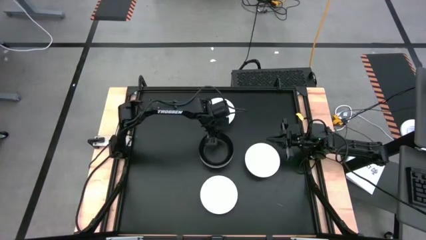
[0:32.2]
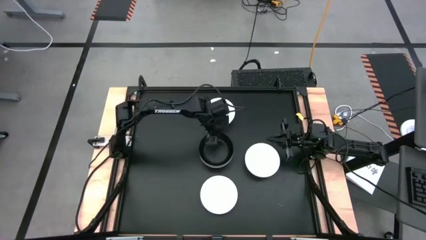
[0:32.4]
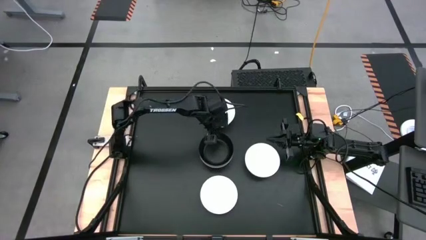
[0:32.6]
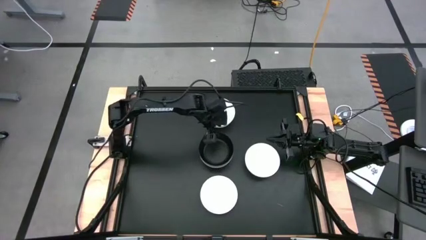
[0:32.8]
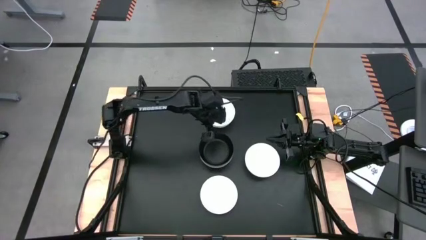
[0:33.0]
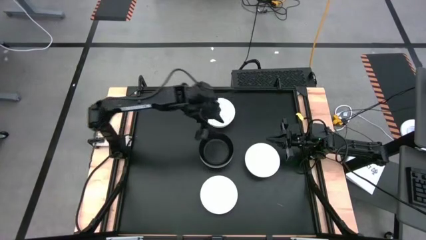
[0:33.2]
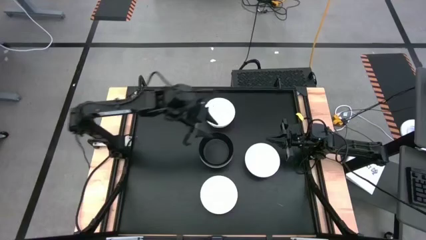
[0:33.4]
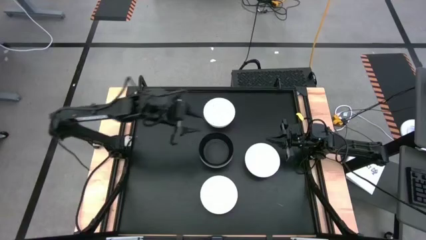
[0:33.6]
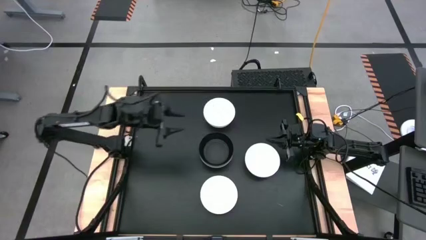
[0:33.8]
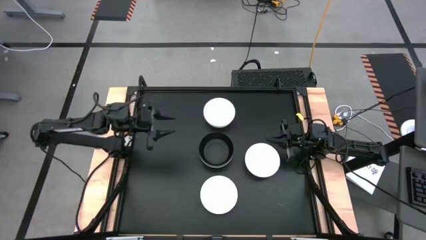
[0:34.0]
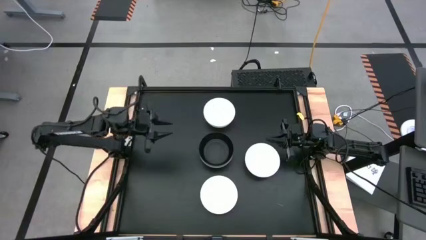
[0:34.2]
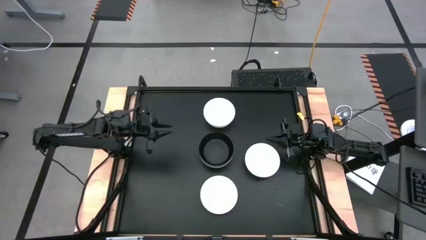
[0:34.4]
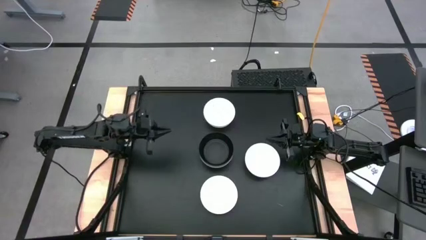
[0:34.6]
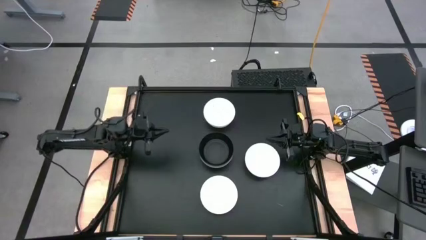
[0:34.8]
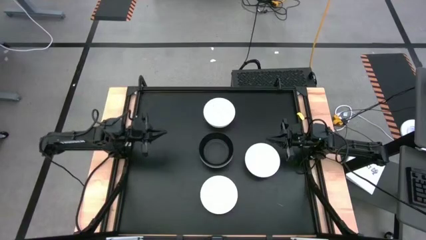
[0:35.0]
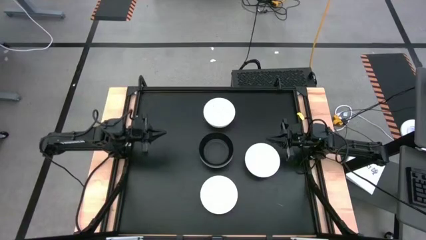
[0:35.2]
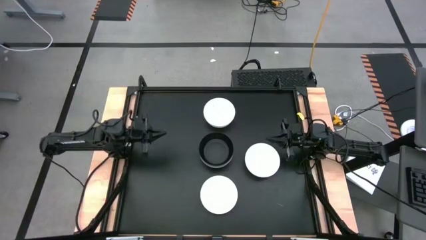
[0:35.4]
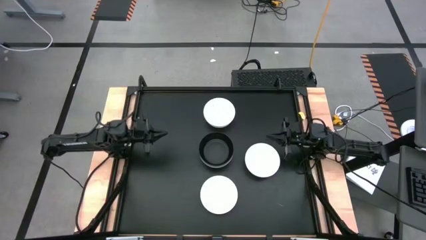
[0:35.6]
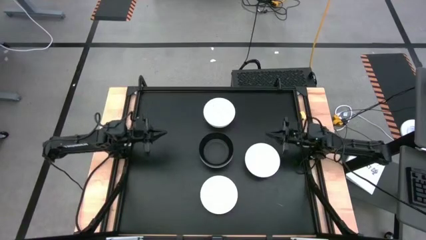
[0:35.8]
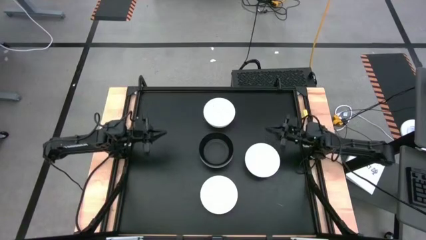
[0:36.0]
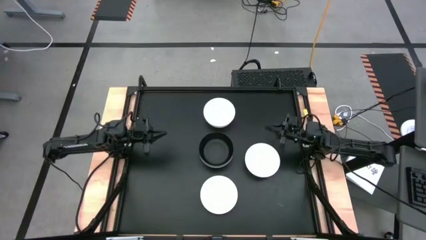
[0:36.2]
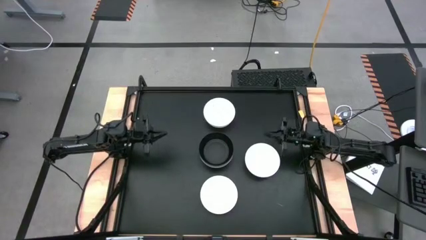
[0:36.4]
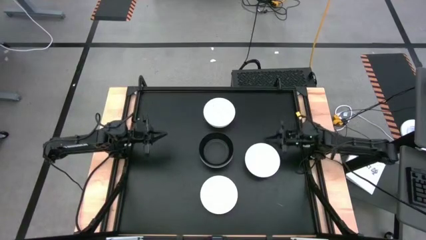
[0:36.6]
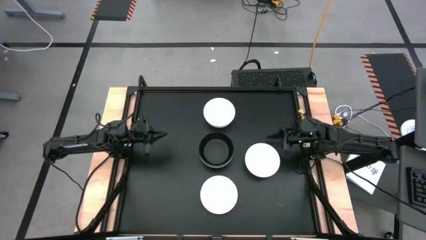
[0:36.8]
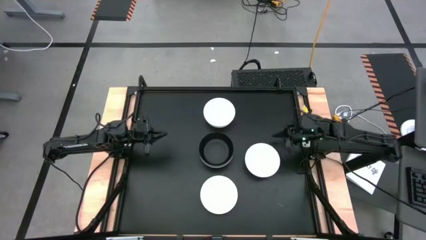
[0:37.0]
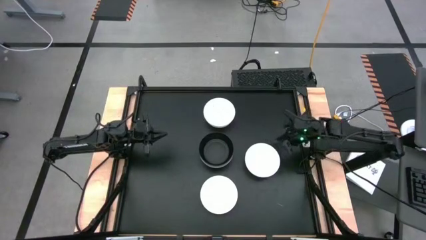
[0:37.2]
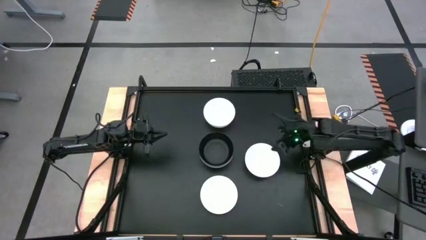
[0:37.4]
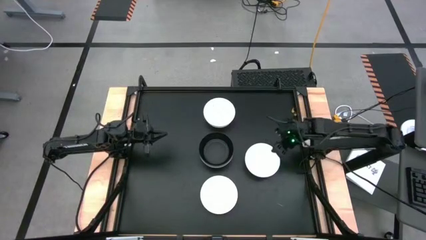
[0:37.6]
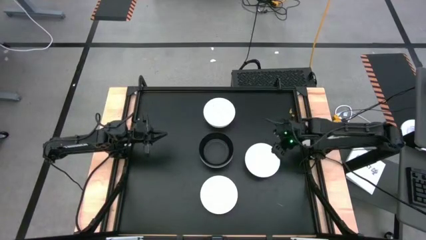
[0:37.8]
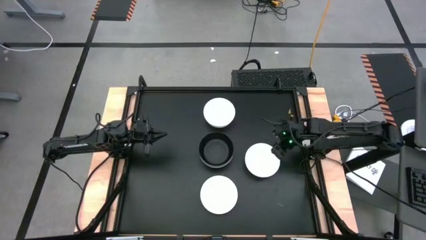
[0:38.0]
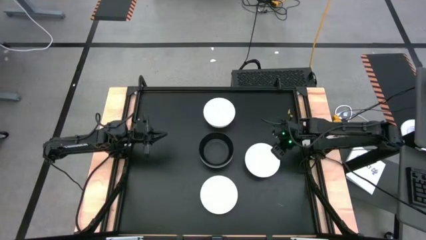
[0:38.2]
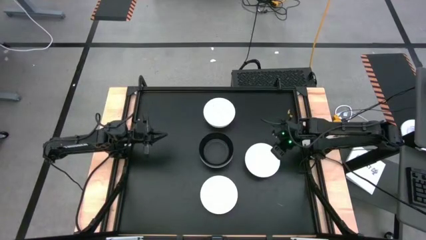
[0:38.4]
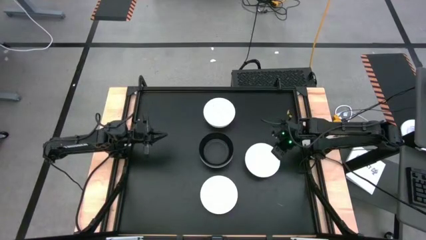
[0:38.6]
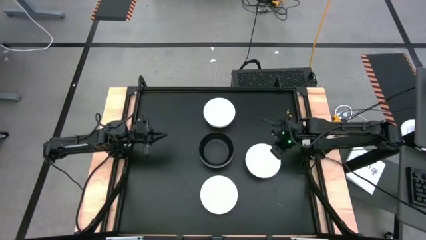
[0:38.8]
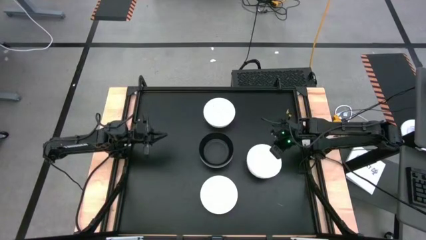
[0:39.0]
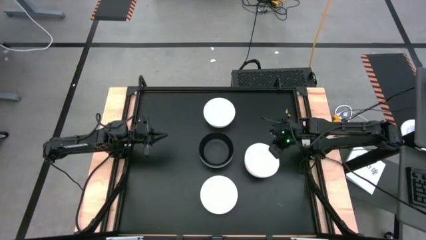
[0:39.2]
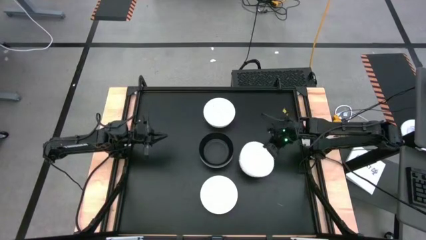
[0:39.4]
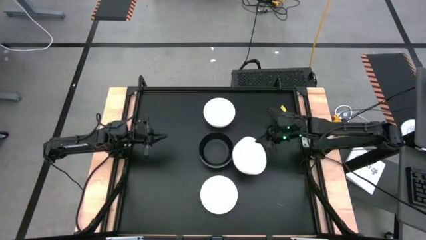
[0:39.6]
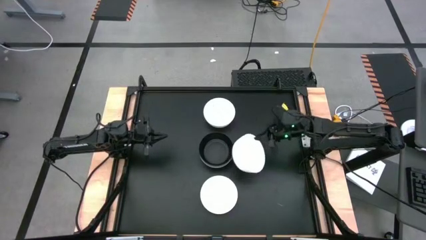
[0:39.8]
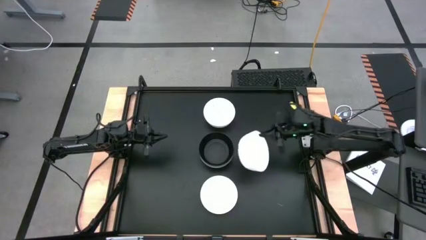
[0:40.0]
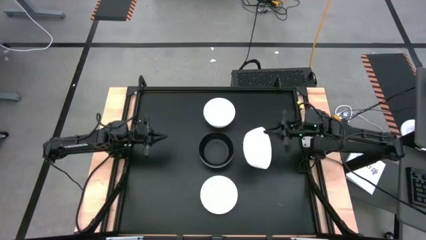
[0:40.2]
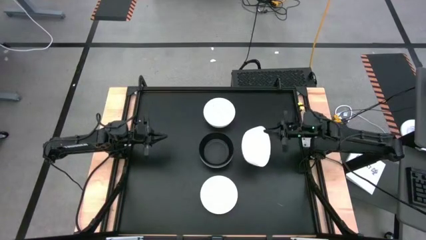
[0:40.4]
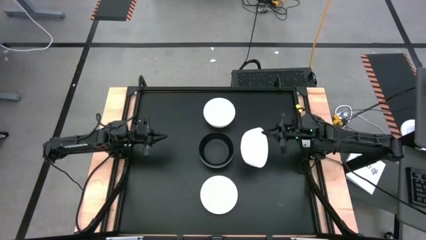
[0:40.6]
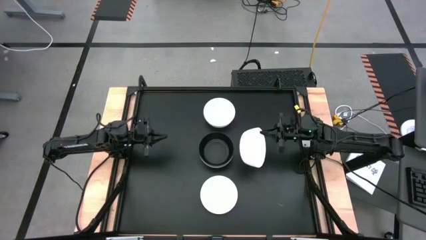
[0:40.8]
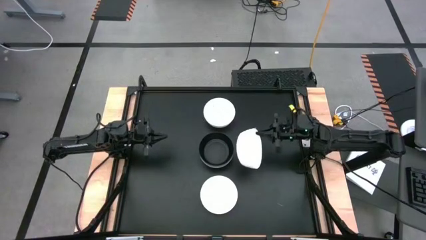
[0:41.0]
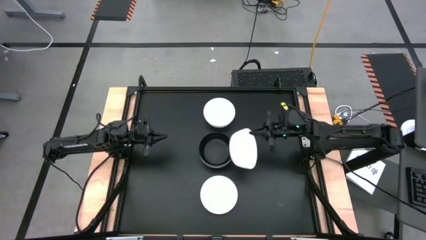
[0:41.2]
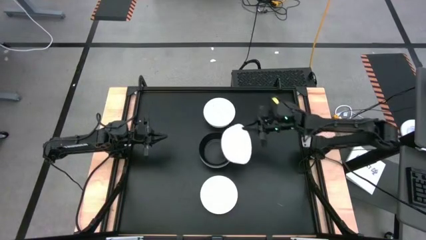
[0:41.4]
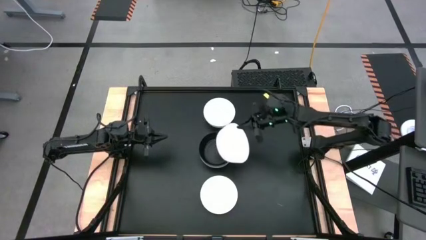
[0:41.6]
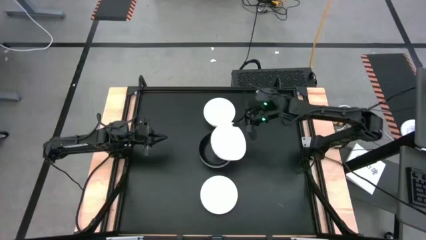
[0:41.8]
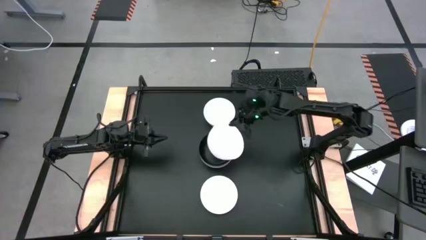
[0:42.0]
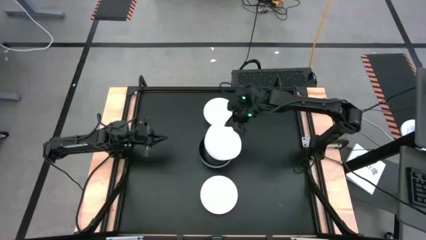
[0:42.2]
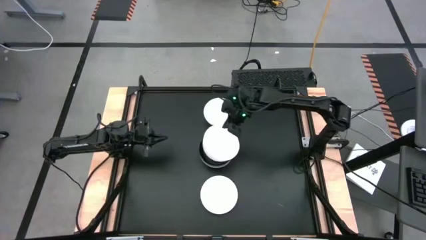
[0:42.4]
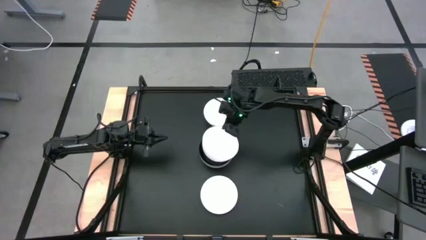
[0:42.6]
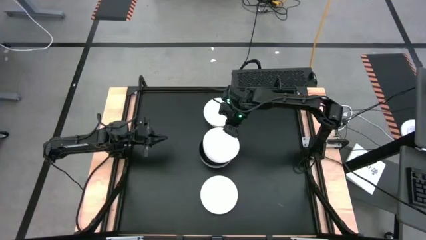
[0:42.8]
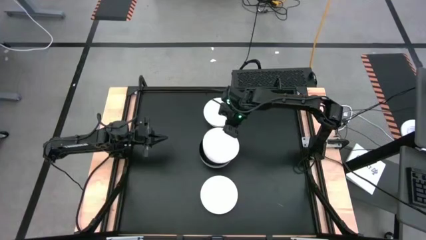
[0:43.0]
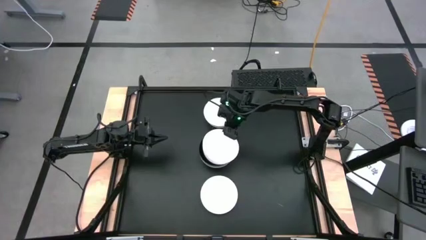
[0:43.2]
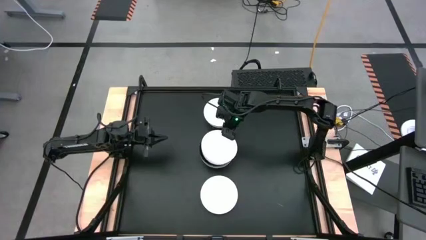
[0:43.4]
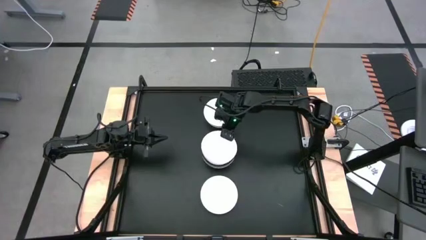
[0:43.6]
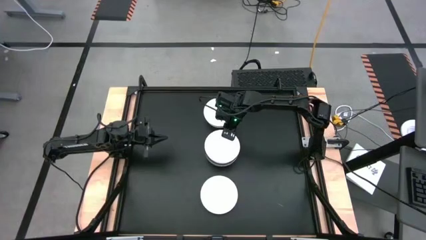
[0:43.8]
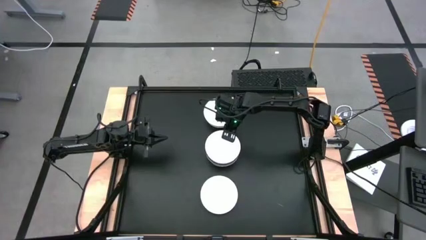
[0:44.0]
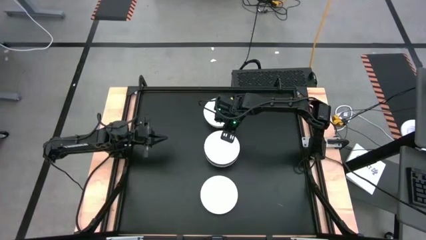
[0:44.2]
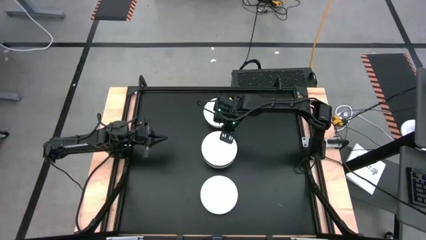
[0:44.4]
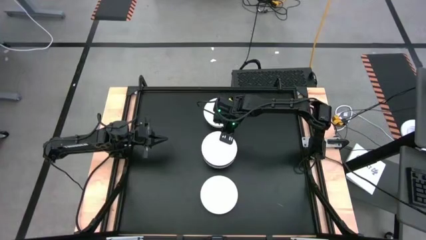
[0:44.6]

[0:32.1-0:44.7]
Task: Nest bowls inside each other
Stack the middle white bowl on top of the black bowl

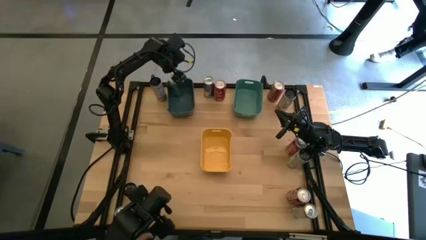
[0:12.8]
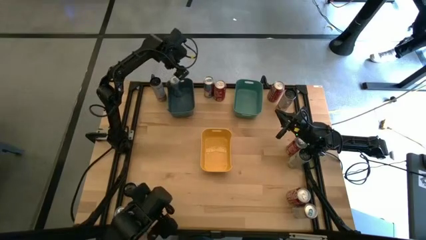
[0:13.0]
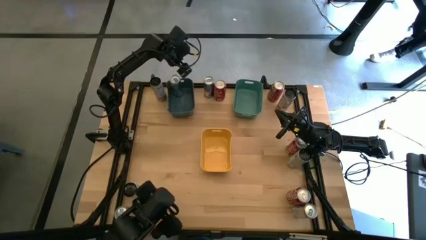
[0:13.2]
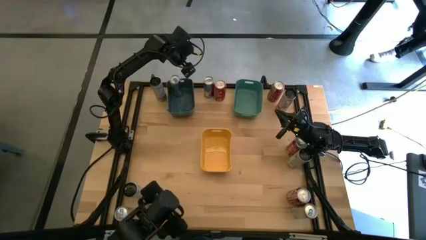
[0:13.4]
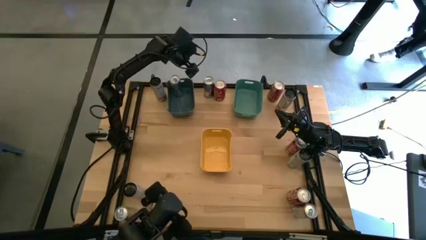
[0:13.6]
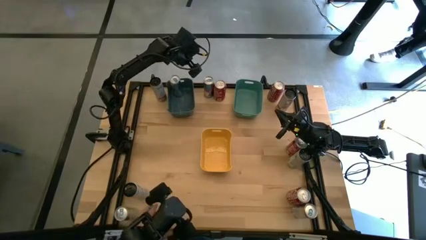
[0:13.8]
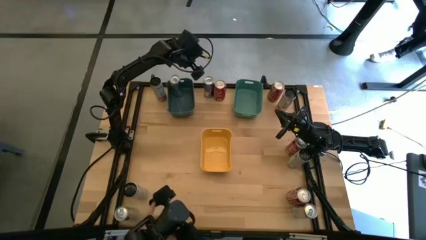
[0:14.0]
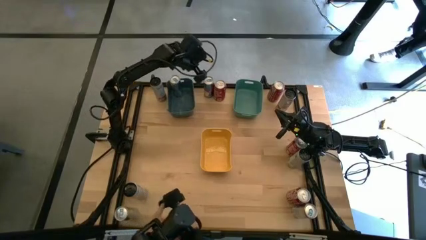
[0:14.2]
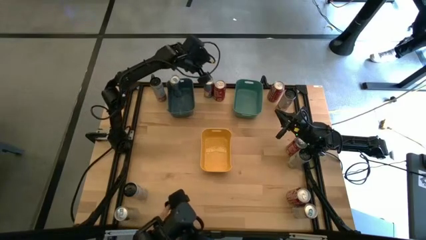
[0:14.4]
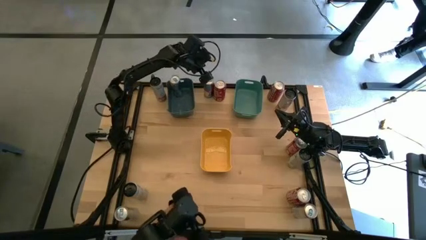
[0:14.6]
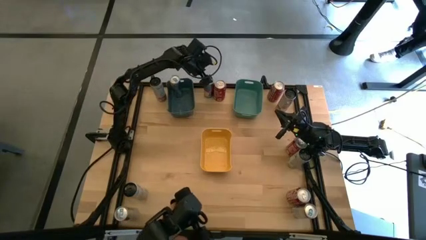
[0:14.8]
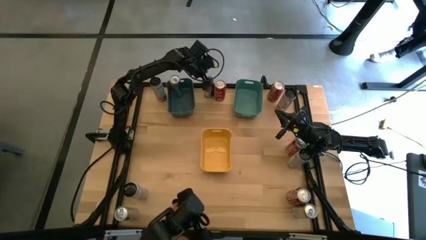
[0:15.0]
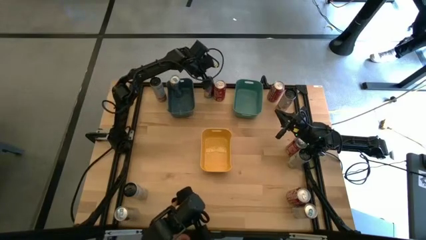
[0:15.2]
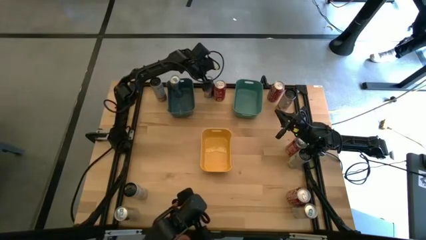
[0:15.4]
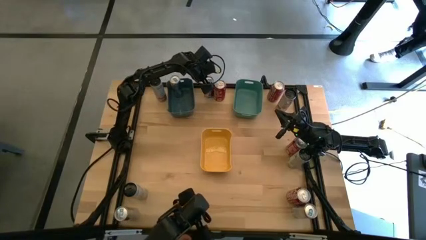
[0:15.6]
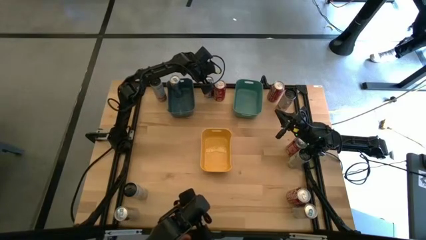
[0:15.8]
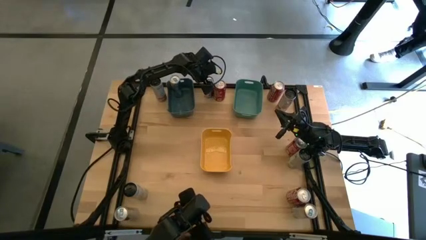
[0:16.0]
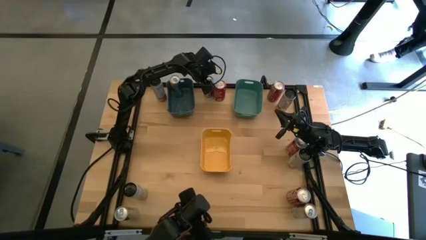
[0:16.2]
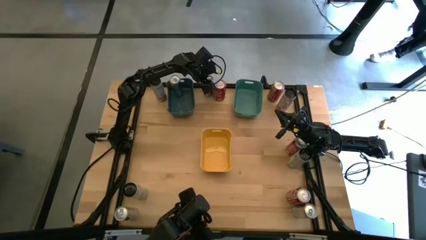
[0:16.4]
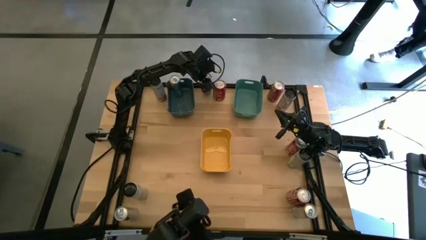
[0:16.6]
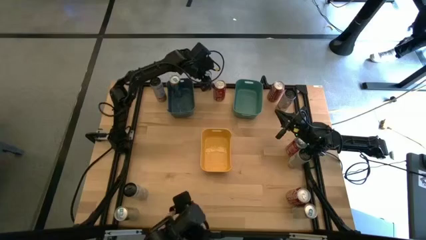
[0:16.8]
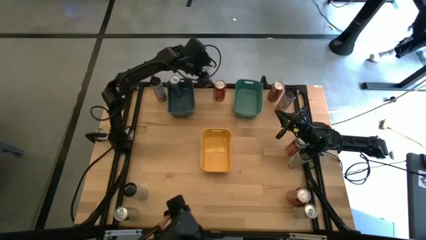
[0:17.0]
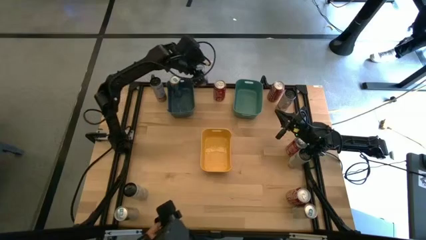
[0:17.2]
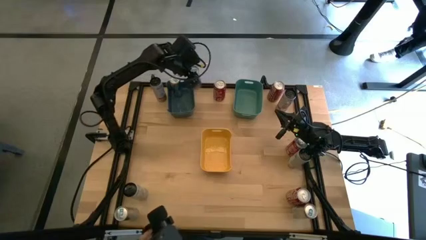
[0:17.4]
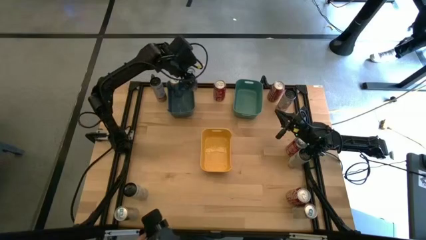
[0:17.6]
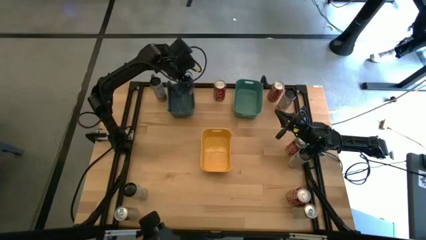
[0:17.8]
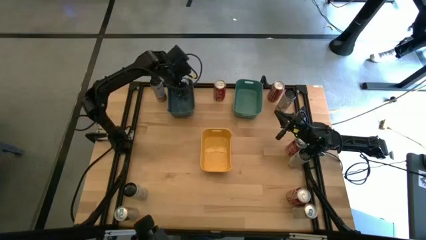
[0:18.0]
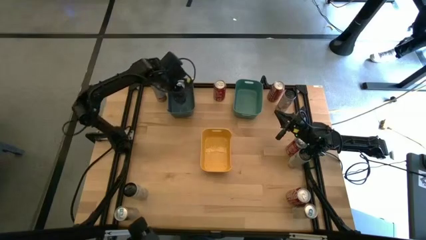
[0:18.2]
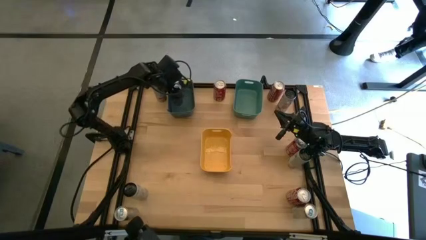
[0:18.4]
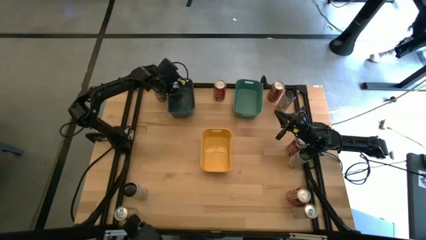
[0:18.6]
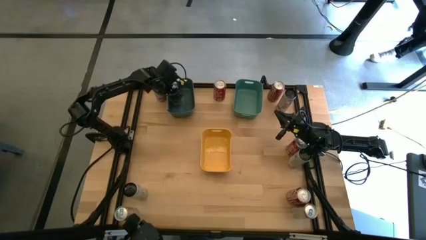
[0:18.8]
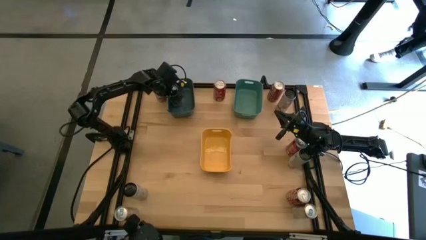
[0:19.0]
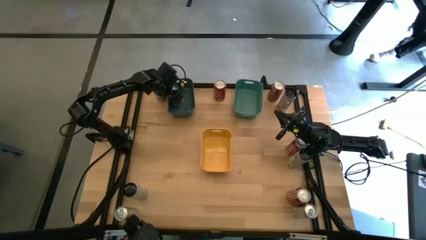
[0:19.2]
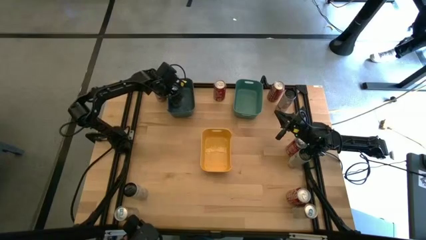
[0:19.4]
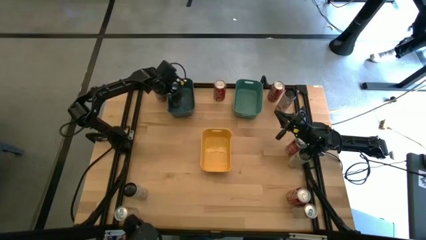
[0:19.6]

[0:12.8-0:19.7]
Task: Sort soda cans
Put the top blue soda can into the blue bin
